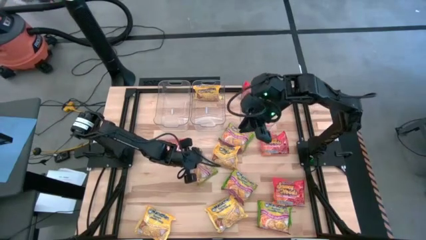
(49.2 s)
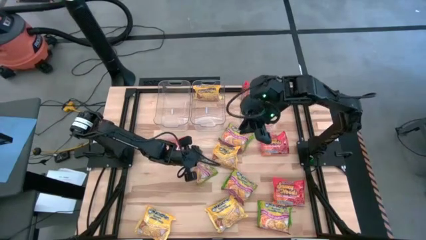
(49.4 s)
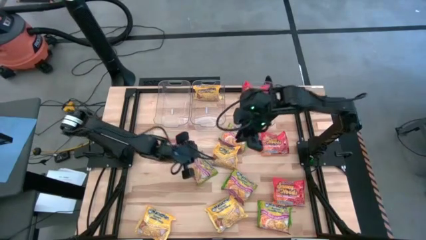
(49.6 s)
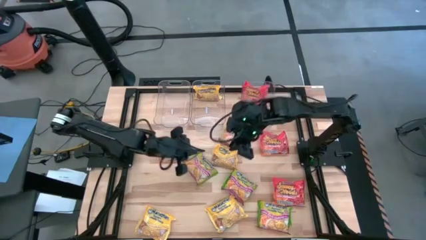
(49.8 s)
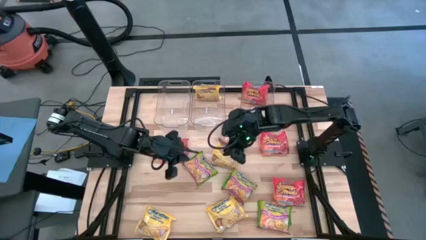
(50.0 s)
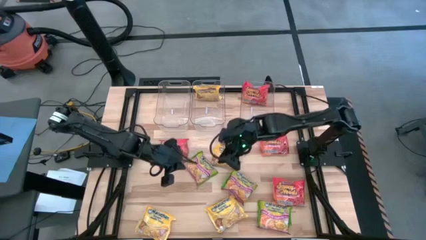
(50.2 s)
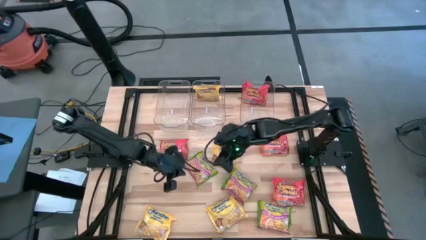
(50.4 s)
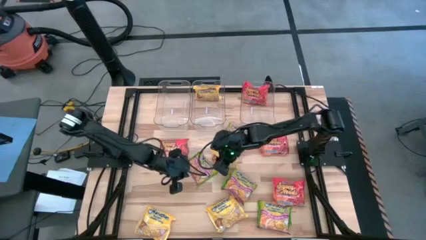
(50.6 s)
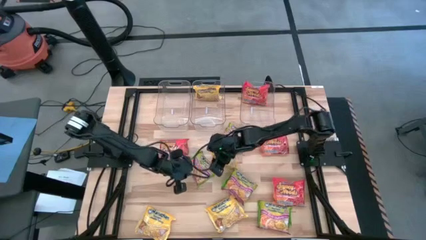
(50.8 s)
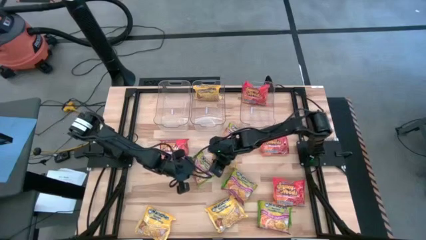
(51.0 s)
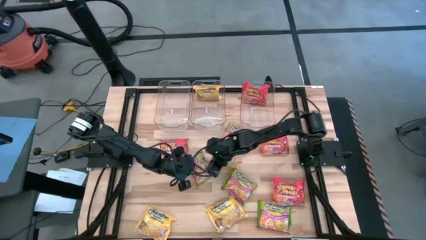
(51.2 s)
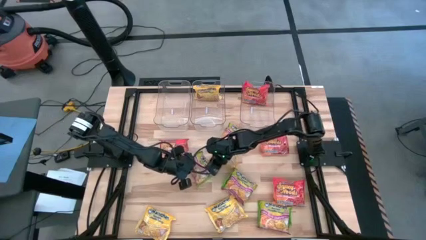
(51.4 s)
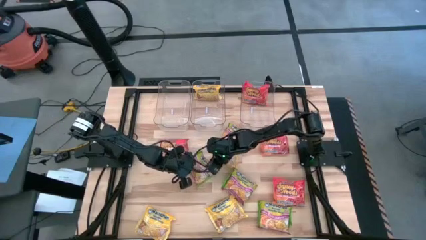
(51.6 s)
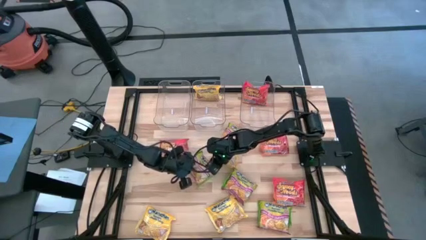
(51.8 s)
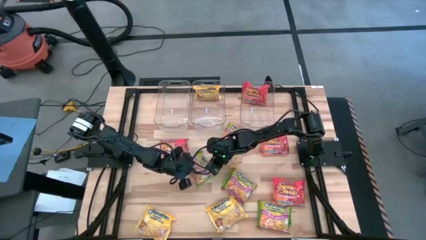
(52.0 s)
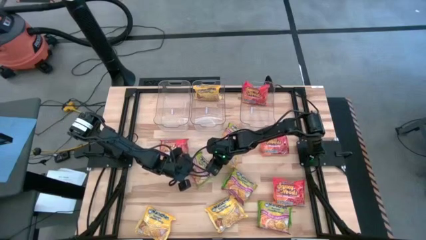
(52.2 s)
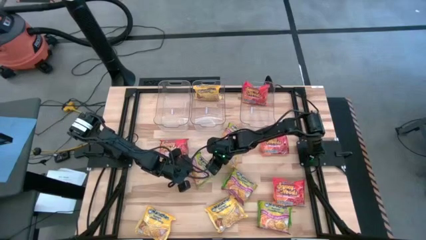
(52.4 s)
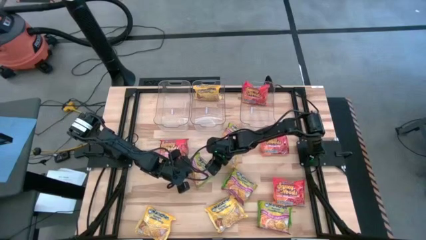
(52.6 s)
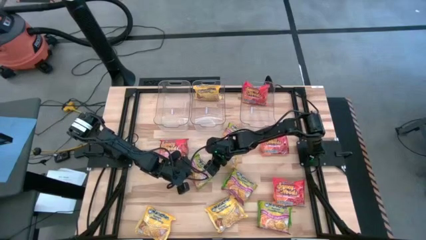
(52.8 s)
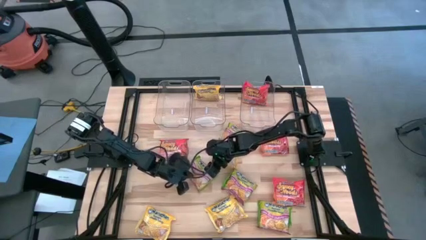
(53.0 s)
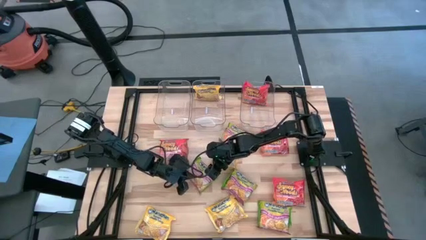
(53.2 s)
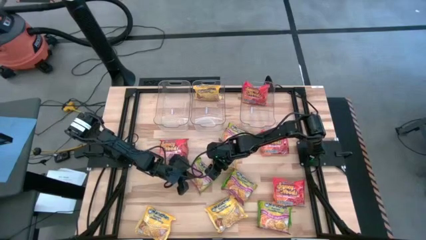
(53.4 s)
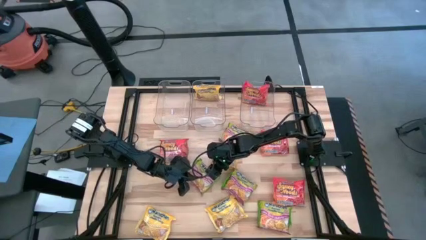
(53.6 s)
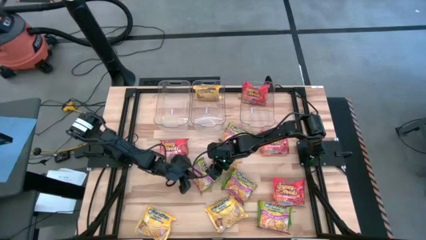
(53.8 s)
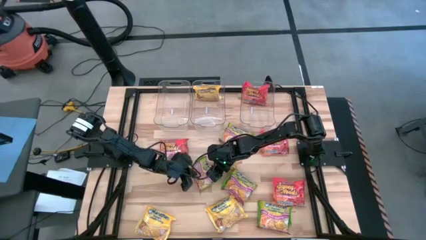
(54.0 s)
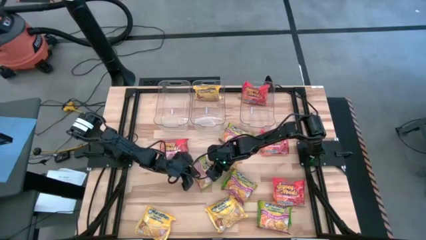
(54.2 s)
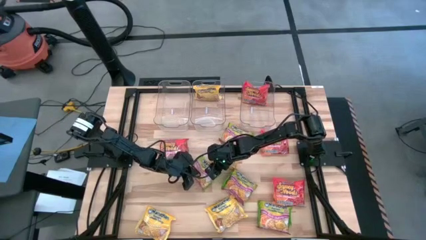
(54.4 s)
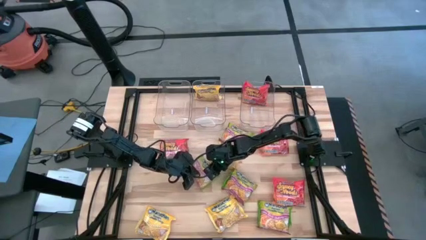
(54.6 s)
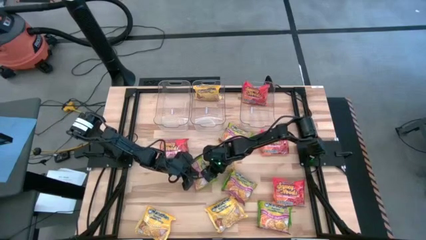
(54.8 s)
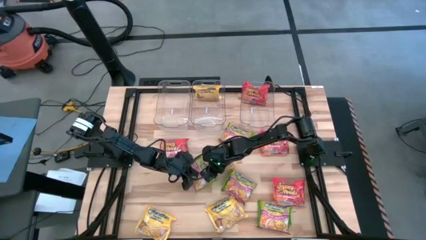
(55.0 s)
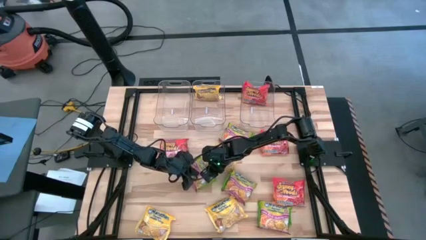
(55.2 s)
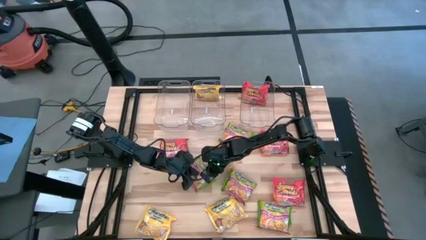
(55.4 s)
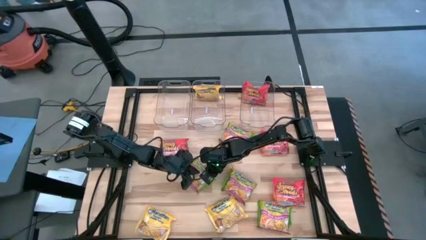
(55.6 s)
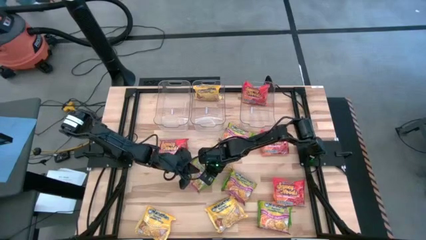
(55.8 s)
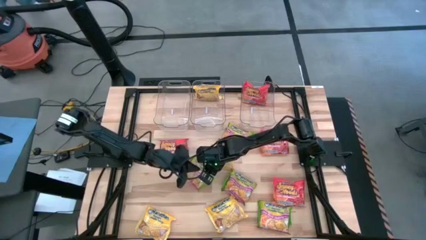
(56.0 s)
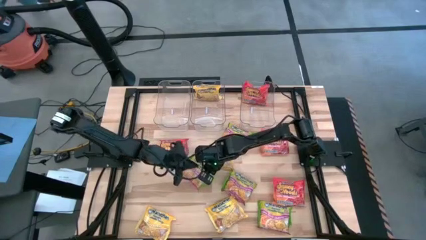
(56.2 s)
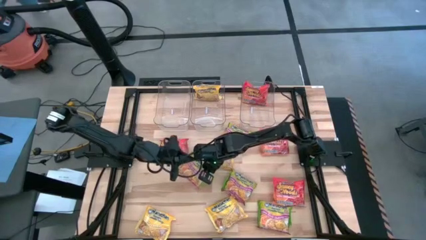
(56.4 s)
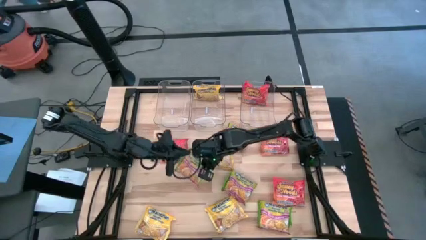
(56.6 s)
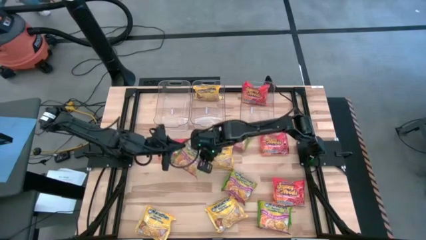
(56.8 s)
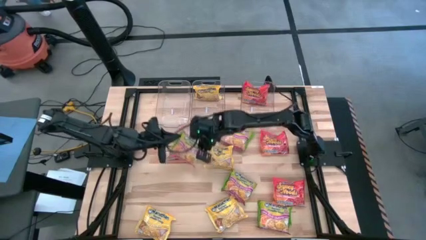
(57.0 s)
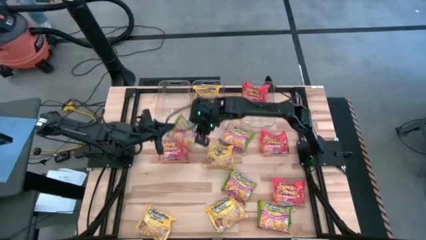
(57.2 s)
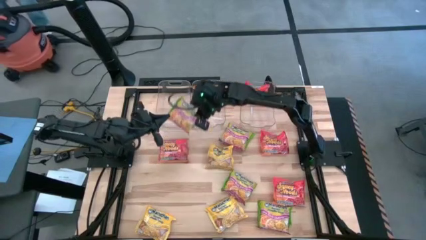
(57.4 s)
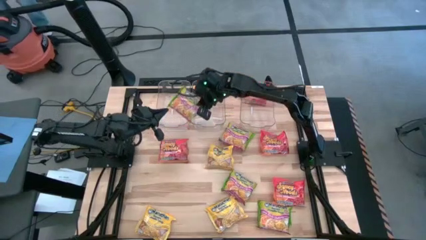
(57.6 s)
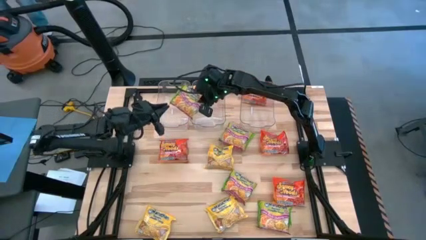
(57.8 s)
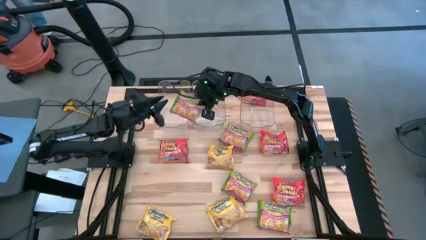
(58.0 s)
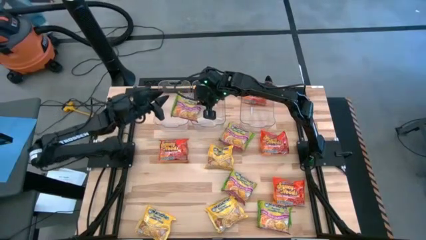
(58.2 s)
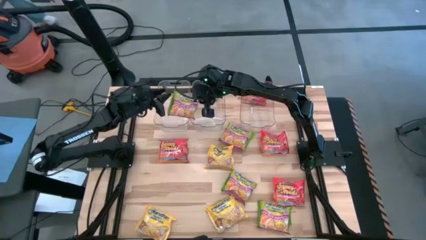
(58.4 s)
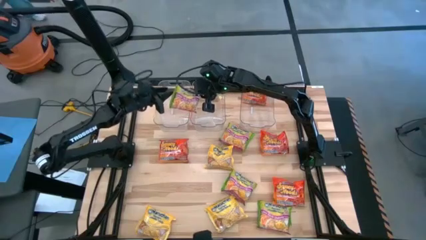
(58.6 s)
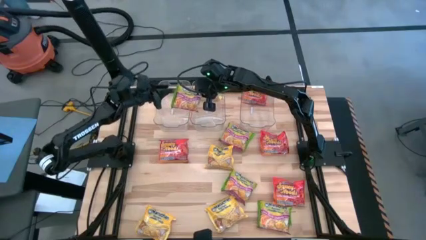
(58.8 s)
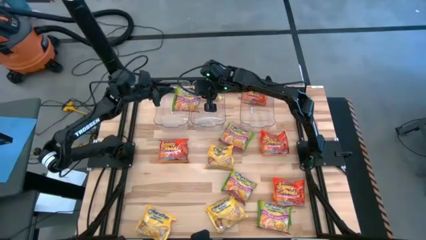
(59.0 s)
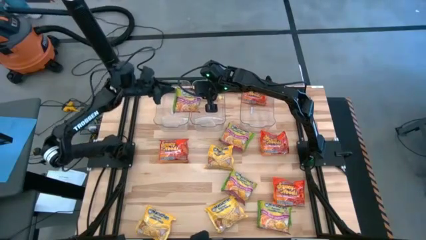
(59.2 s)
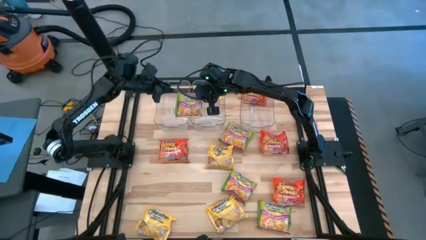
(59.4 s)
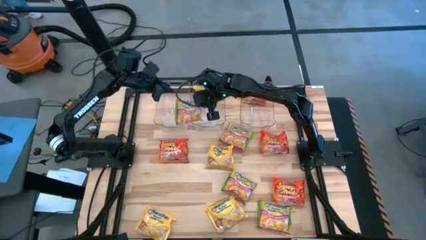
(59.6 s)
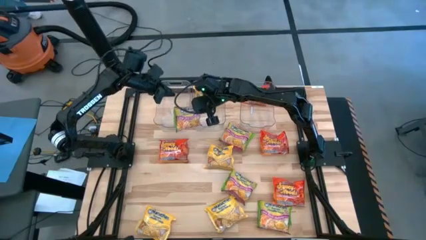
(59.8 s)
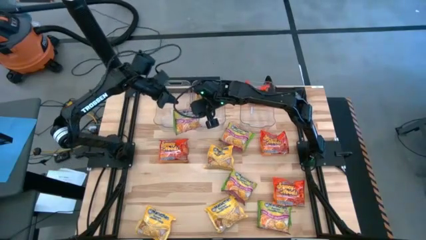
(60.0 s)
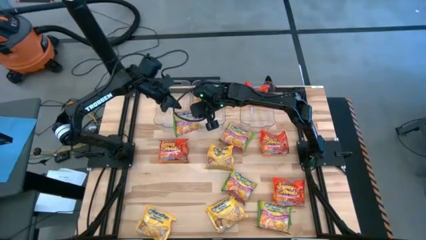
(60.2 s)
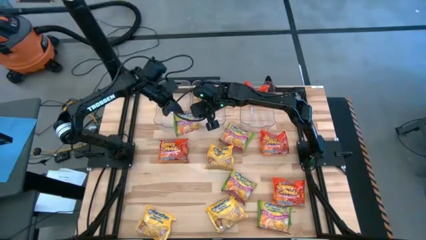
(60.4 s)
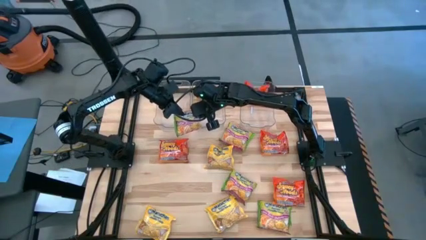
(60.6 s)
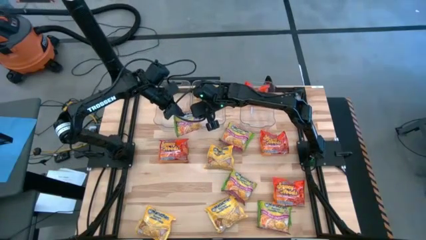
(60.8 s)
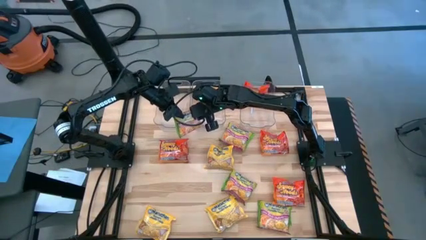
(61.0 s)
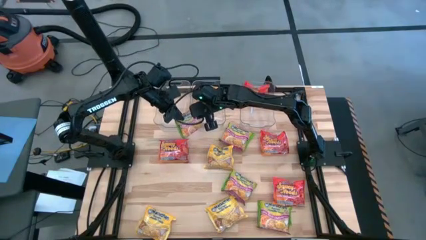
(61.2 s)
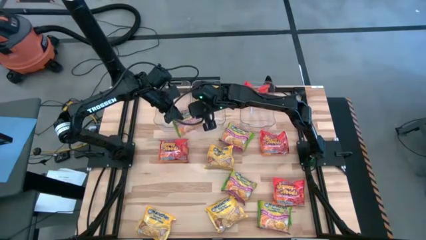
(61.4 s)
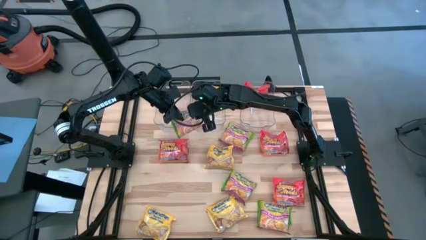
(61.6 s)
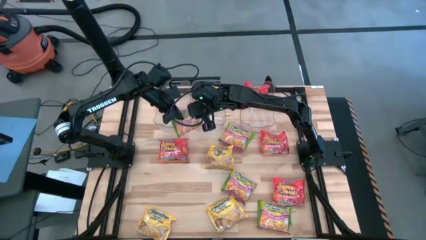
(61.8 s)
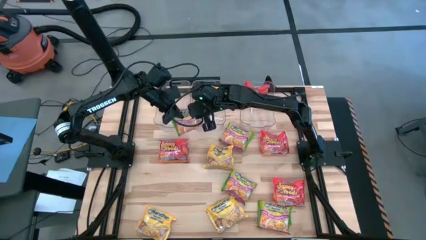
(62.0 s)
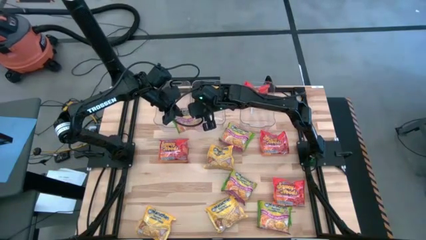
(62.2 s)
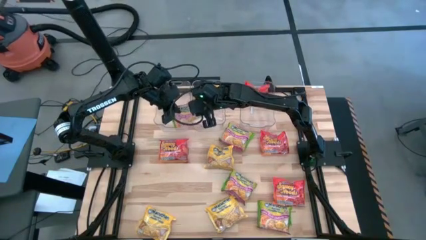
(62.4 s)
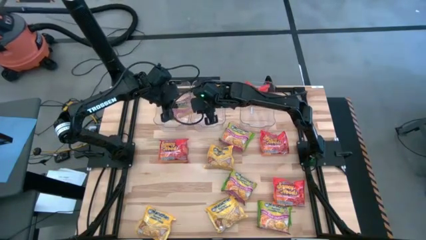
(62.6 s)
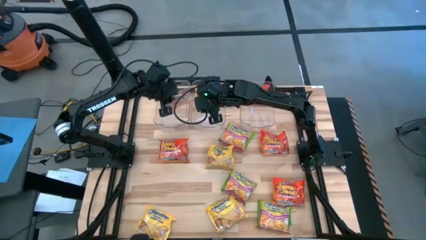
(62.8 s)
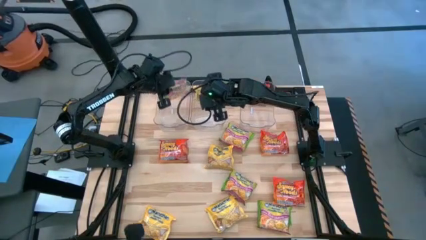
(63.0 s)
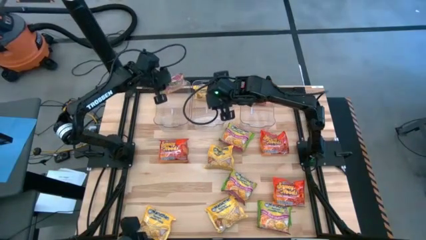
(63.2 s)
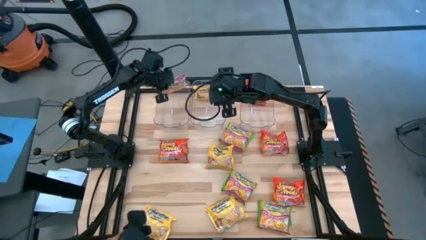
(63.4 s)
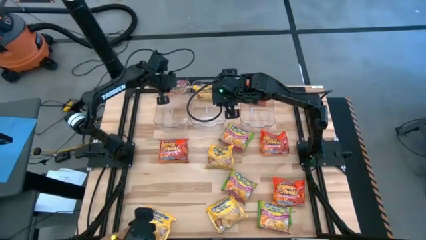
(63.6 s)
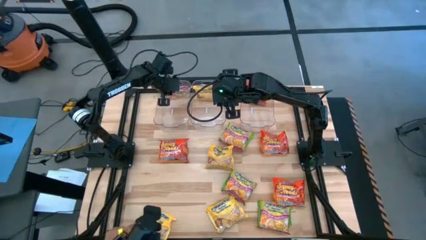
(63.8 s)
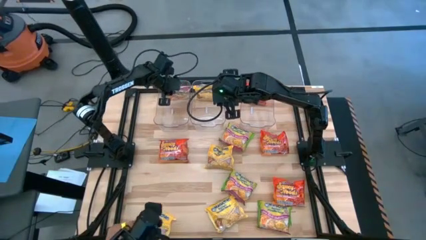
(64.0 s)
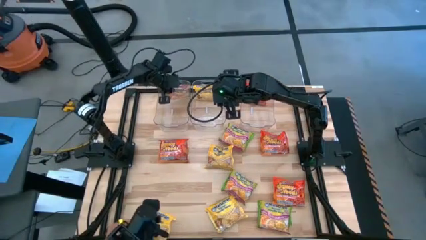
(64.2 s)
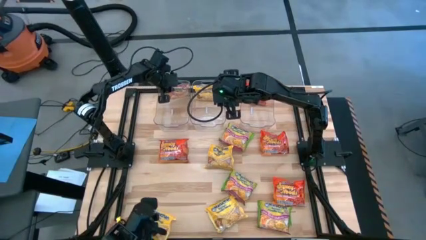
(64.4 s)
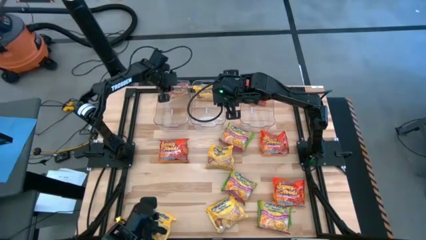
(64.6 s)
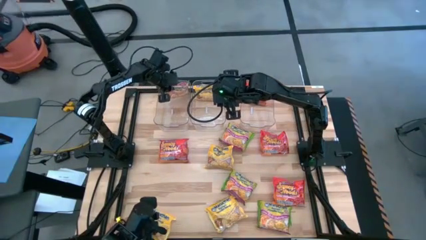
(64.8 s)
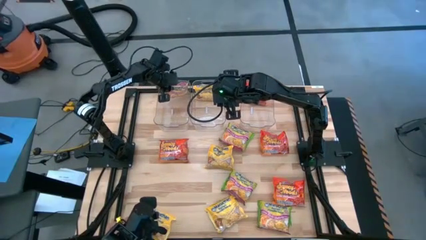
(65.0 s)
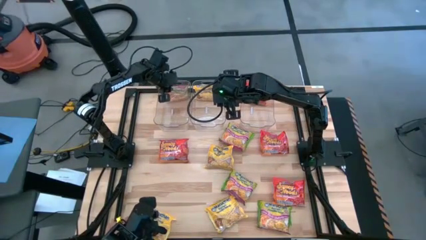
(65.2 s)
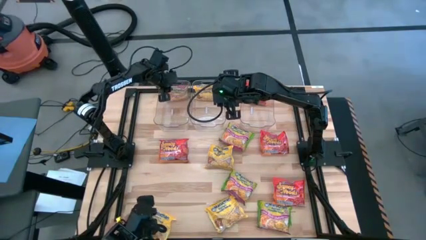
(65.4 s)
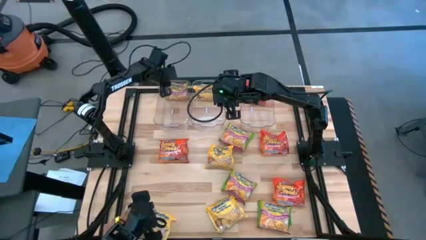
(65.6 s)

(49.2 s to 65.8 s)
Task: Sort Maruchan noodles
Put the green noodle pack into the left transparent bin
